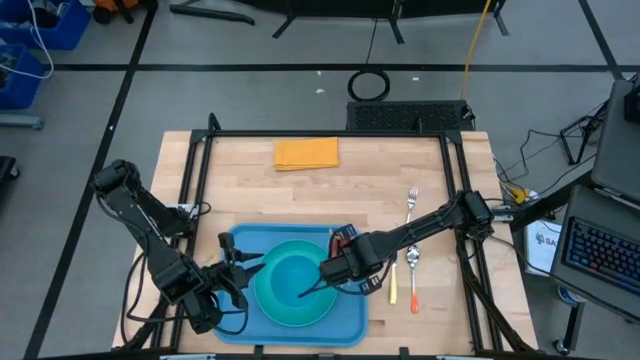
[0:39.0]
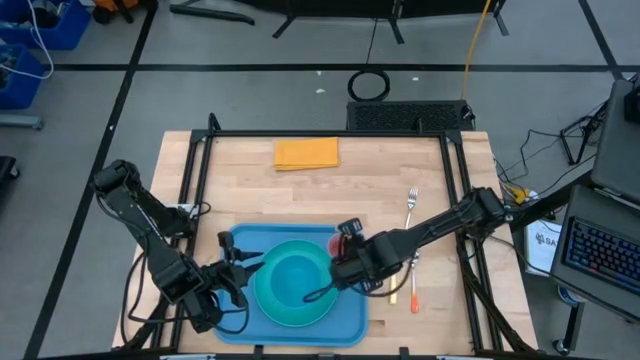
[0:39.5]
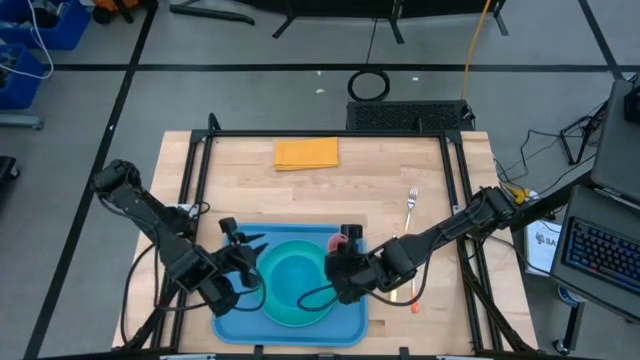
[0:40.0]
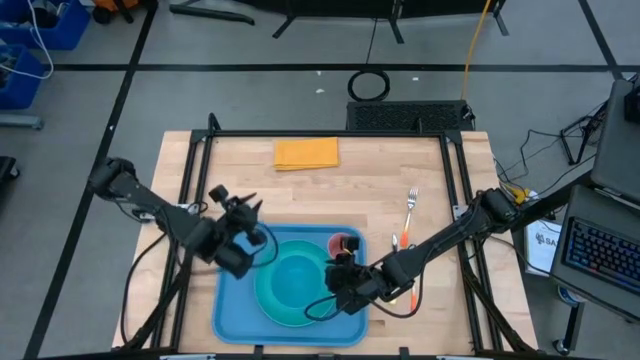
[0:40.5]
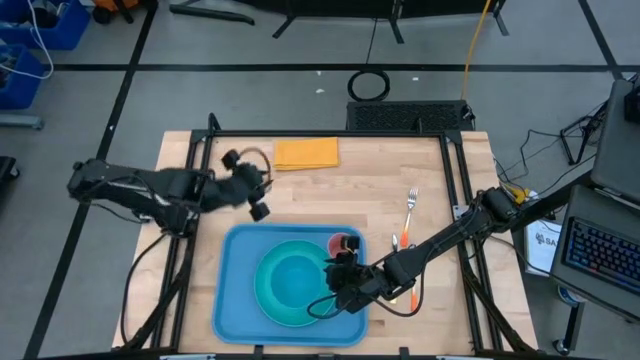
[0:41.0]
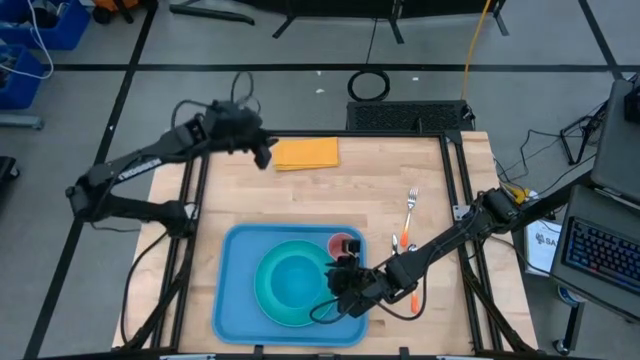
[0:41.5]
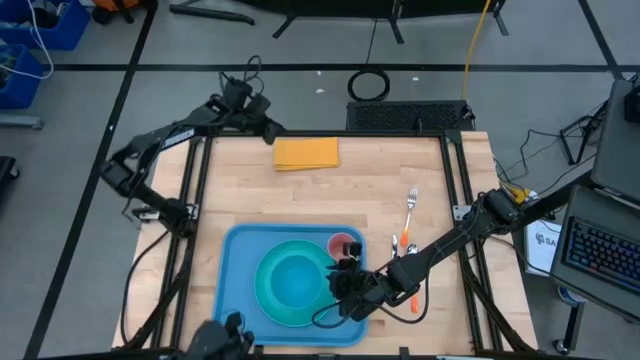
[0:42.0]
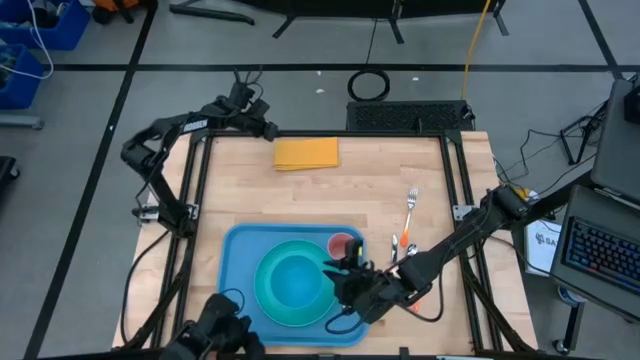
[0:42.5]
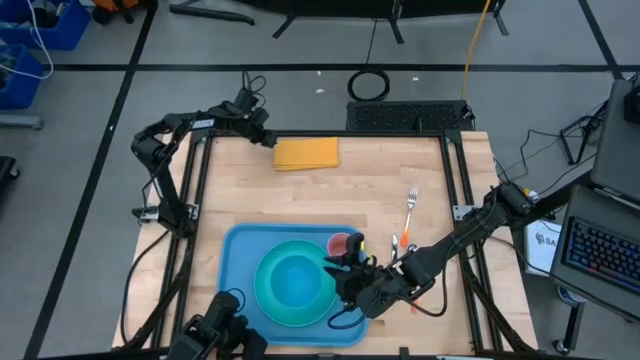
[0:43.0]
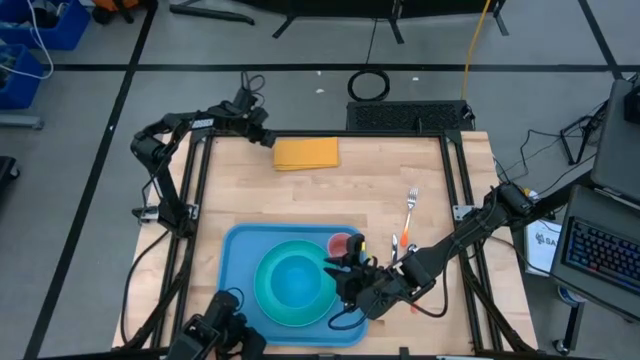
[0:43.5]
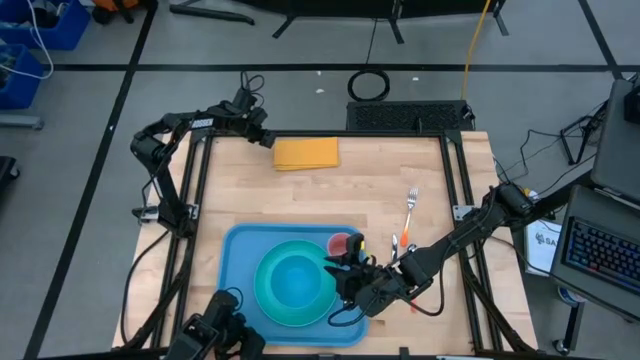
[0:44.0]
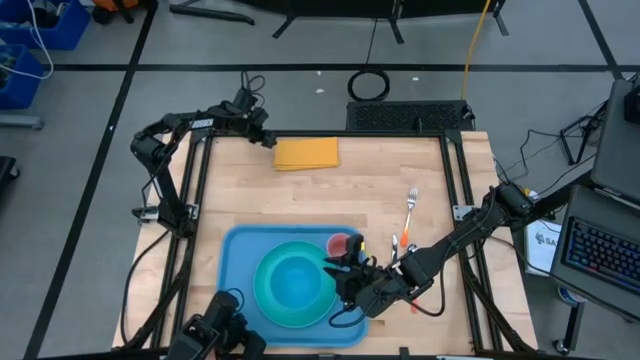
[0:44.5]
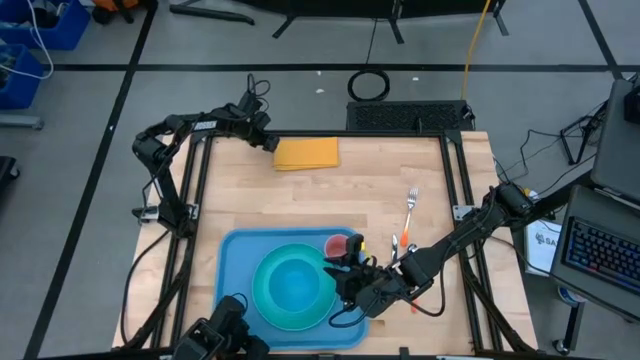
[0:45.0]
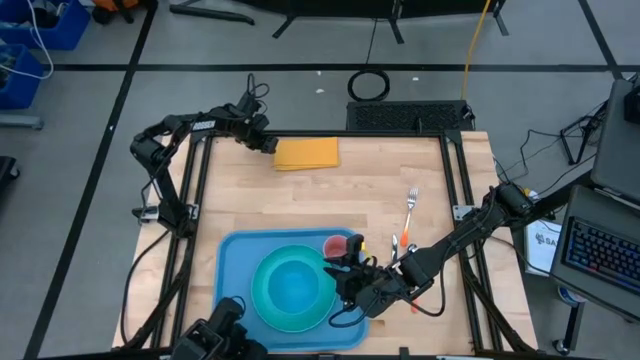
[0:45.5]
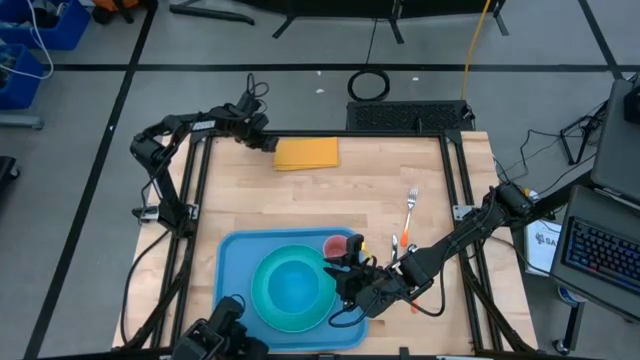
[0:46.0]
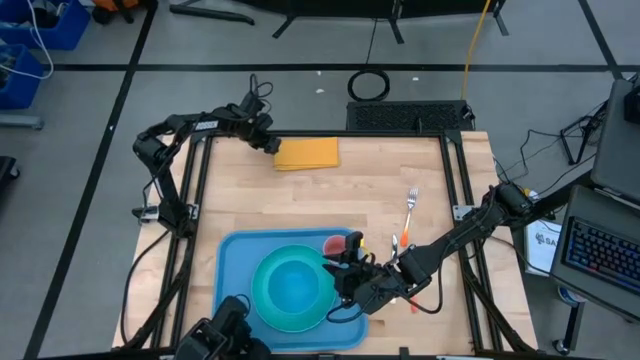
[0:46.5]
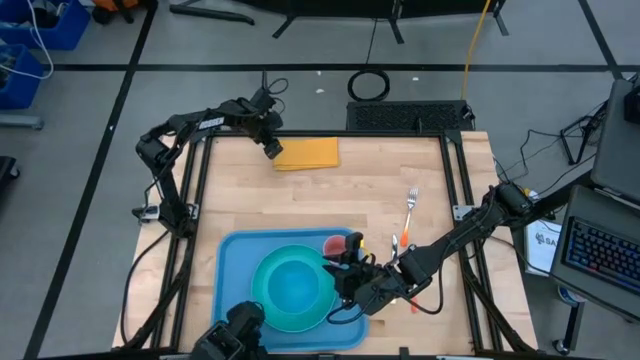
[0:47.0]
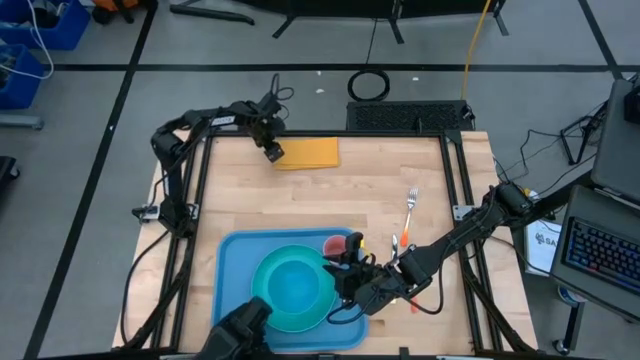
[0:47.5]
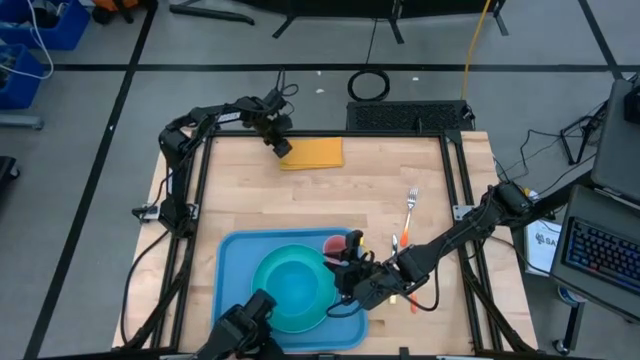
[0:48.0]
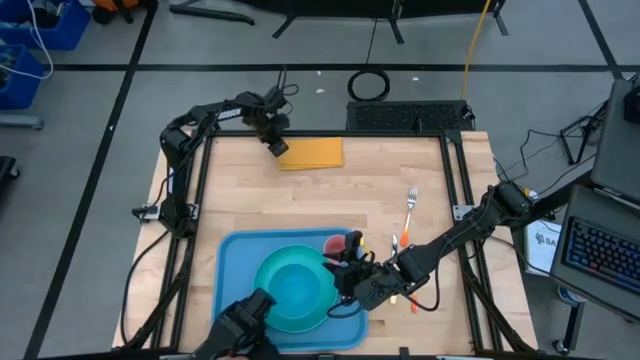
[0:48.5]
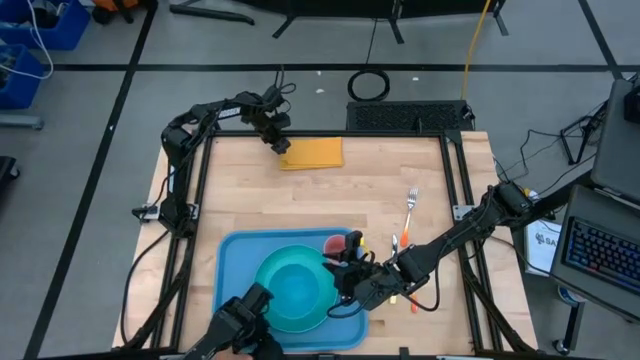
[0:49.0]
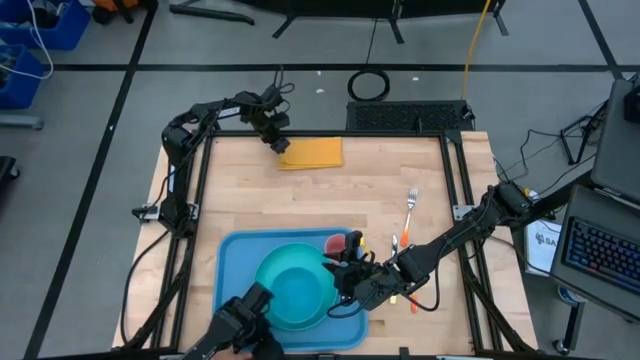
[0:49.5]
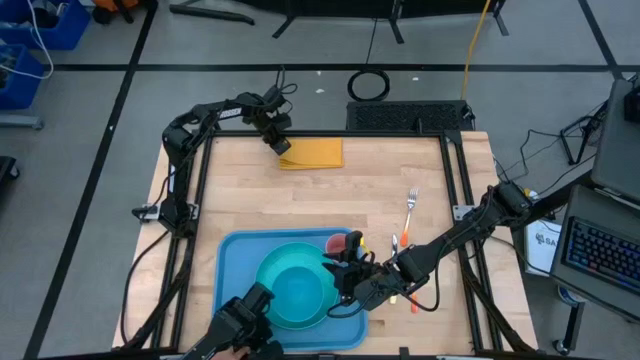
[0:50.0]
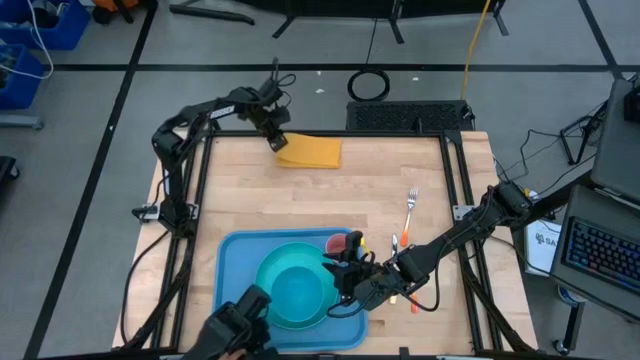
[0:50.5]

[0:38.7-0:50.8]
Task: Set up tray
Put the yellow table napkin to the left of the green plate on the blue tray

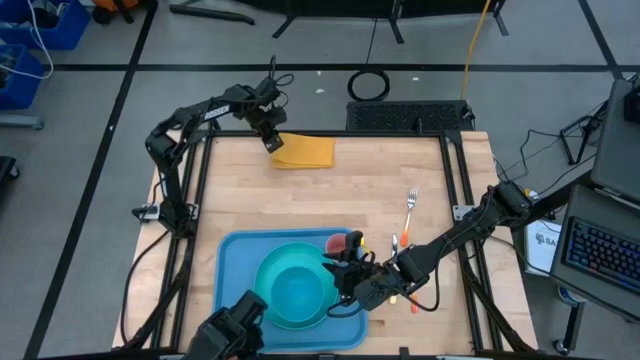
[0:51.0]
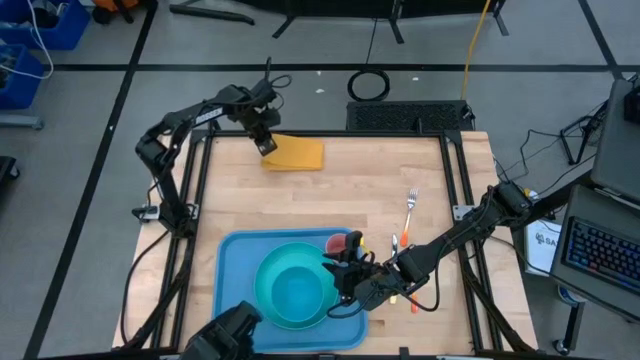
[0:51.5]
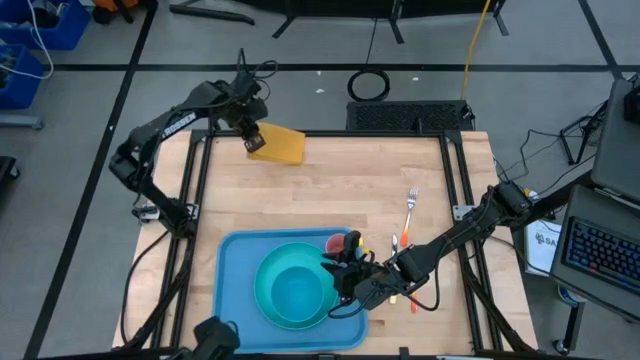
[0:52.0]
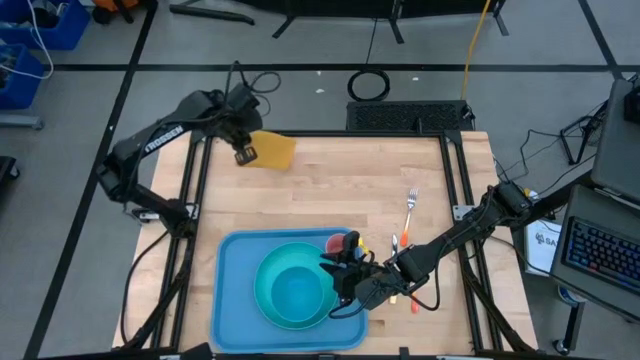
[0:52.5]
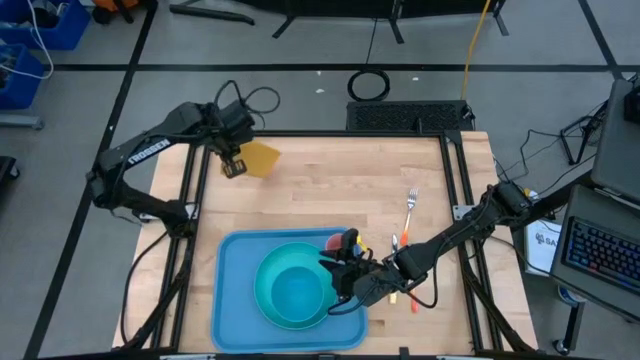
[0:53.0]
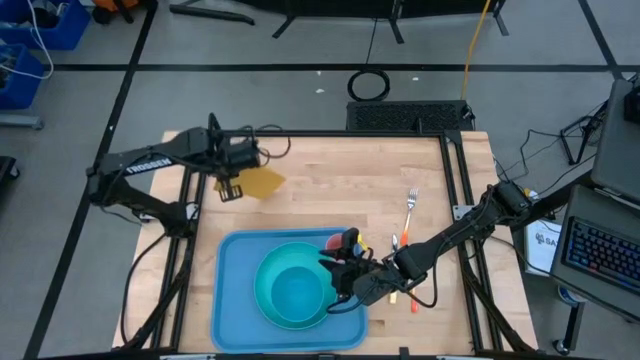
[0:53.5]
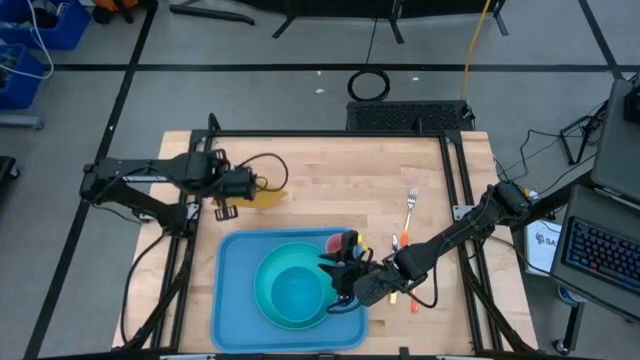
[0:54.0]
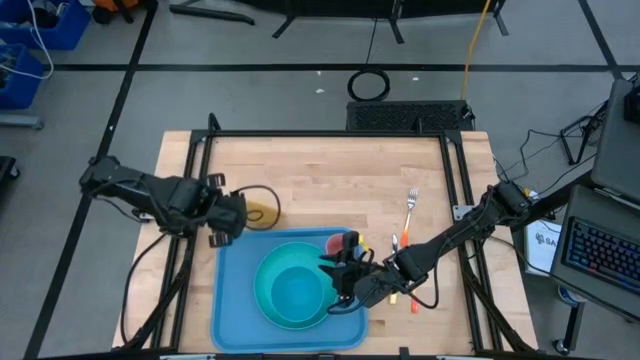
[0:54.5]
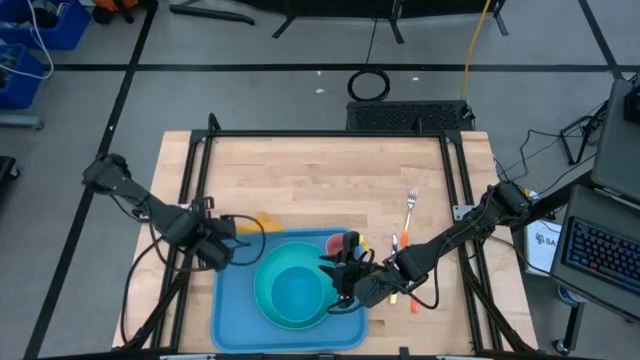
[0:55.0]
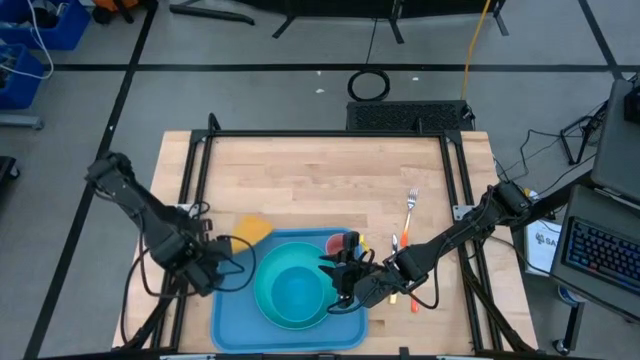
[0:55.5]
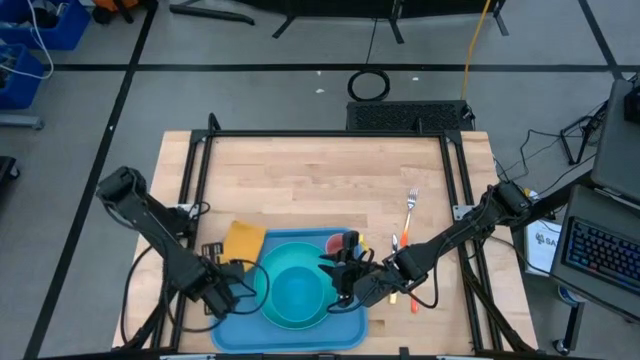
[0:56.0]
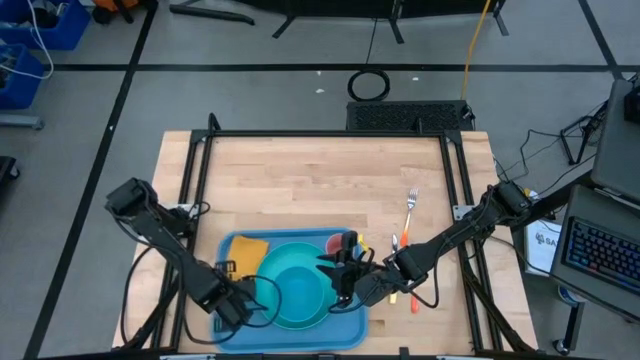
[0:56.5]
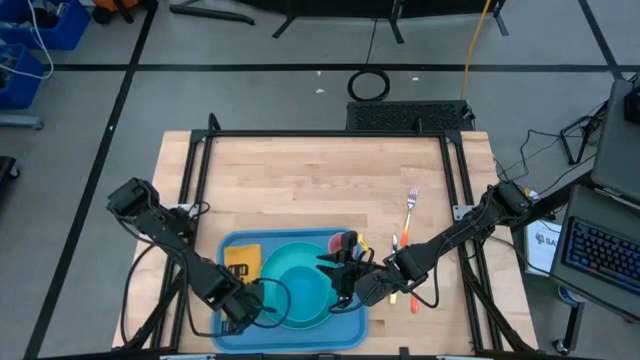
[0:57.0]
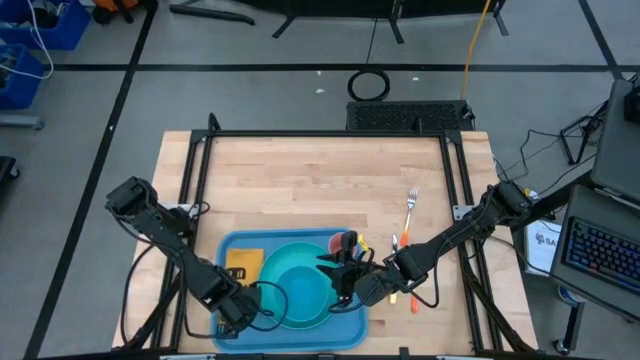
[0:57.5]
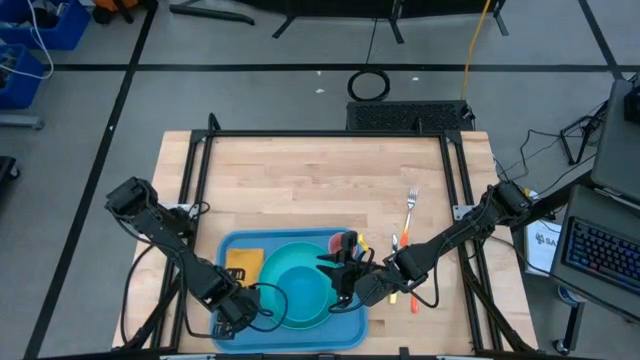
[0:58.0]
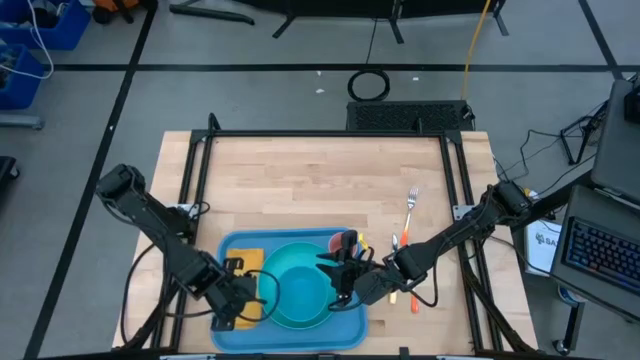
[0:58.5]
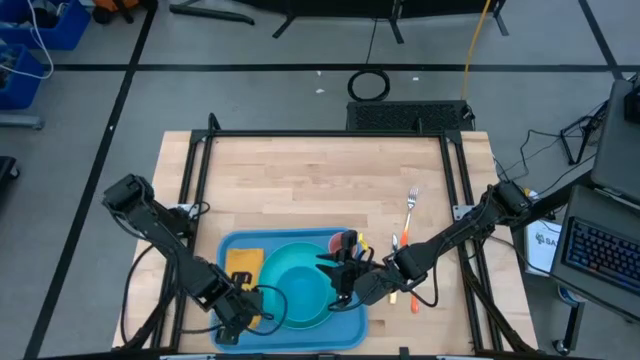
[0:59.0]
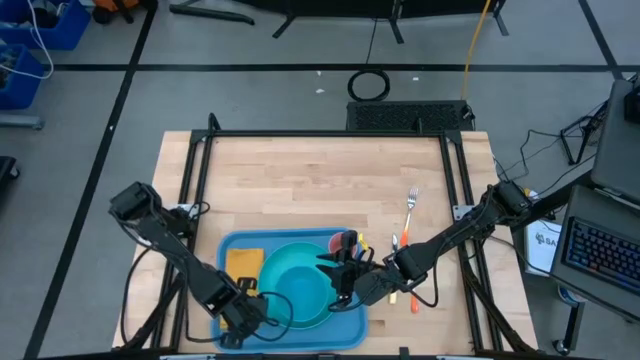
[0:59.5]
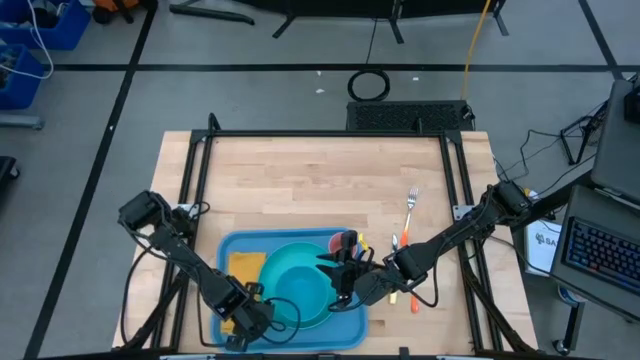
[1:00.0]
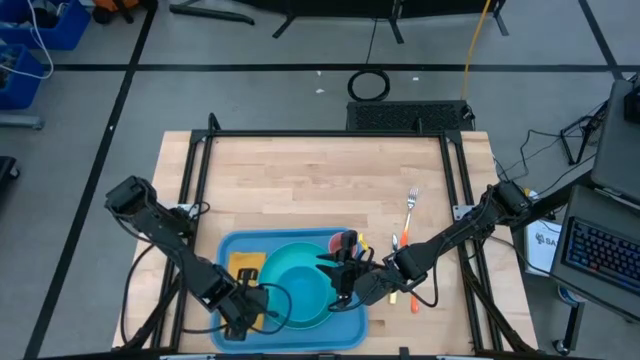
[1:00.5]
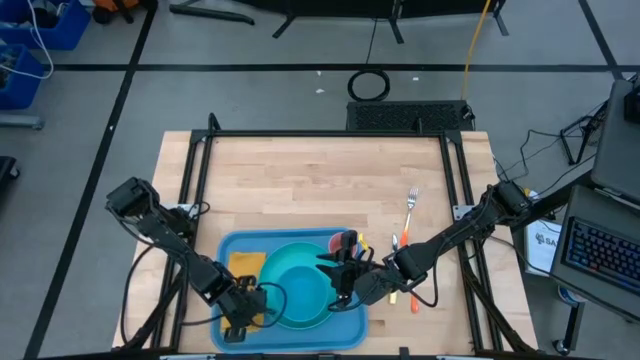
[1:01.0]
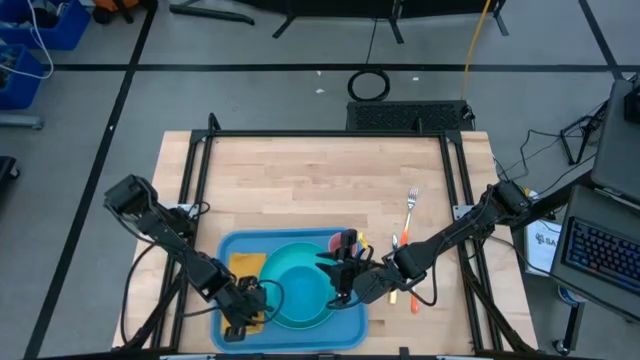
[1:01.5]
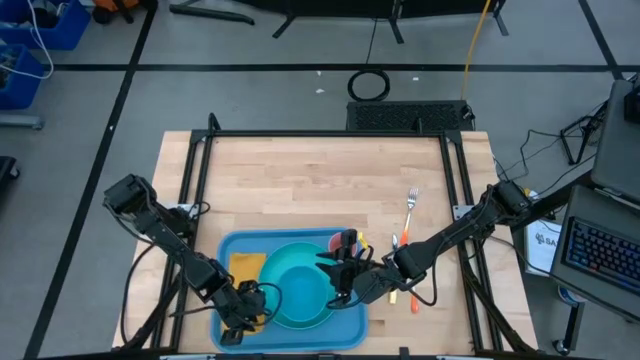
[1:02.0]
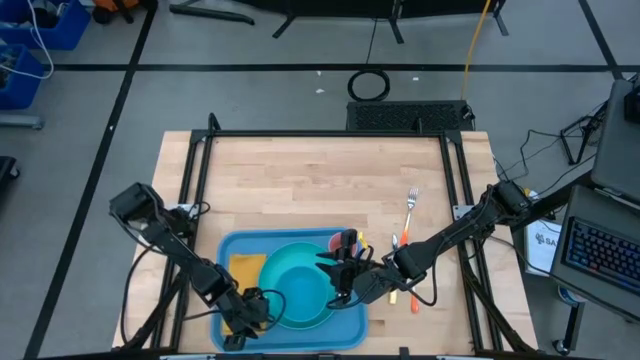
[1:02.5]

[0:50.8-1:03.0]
Put the yellow table napkin to the left of the green plate on the blue tray
